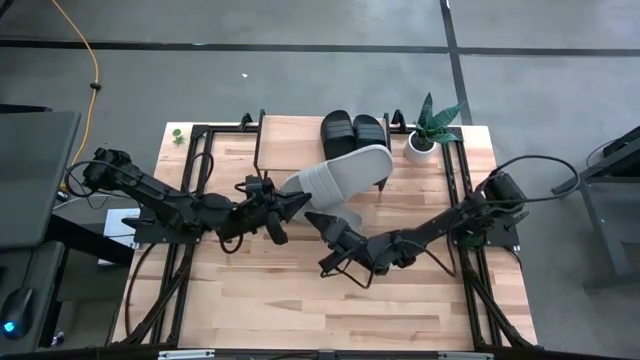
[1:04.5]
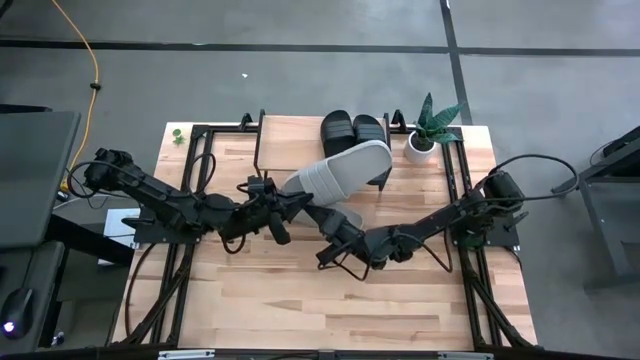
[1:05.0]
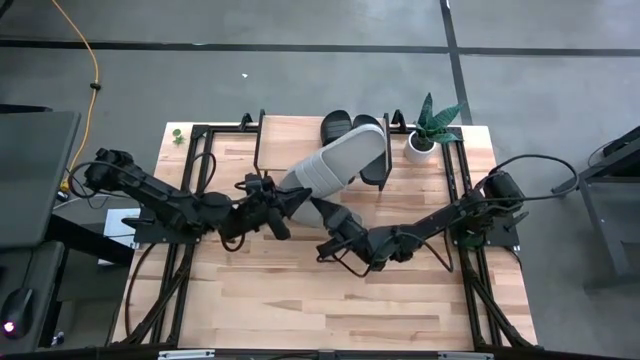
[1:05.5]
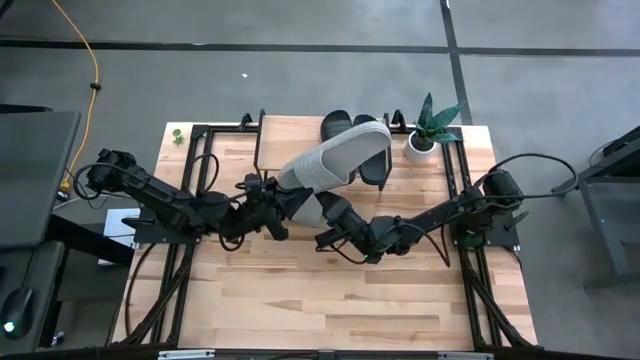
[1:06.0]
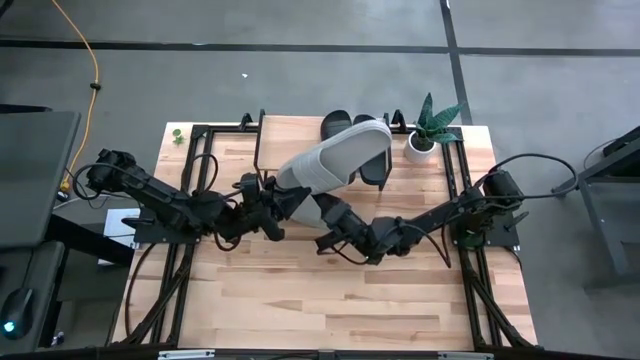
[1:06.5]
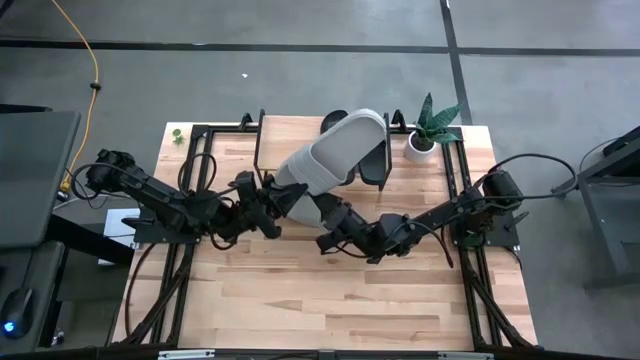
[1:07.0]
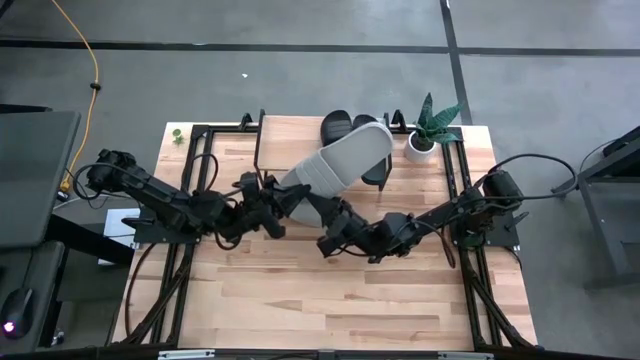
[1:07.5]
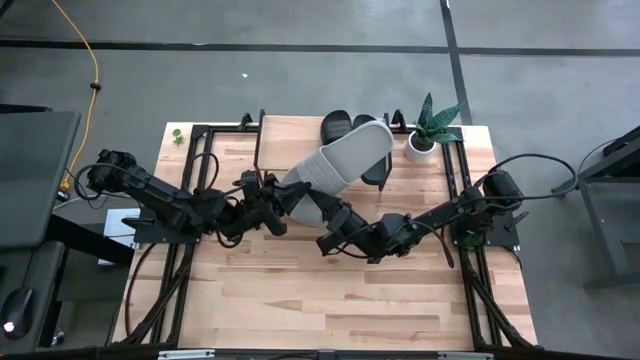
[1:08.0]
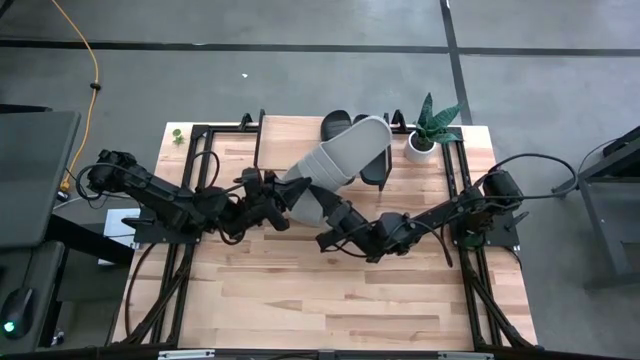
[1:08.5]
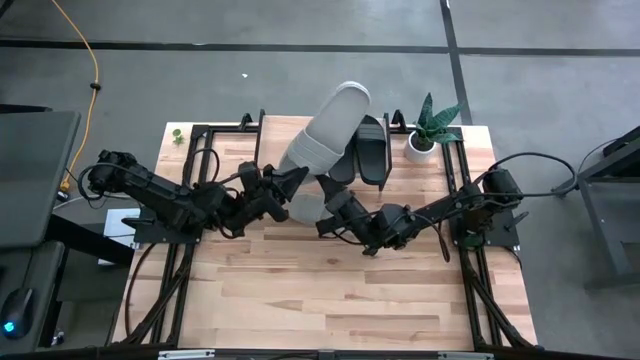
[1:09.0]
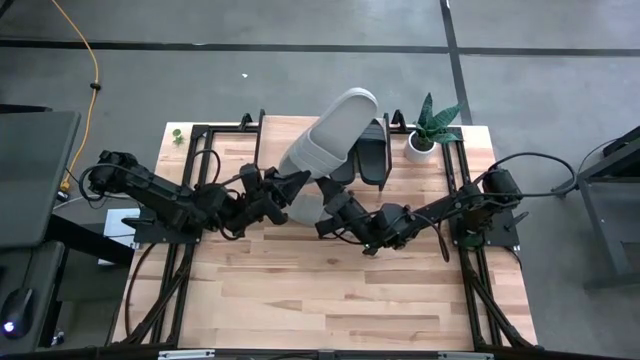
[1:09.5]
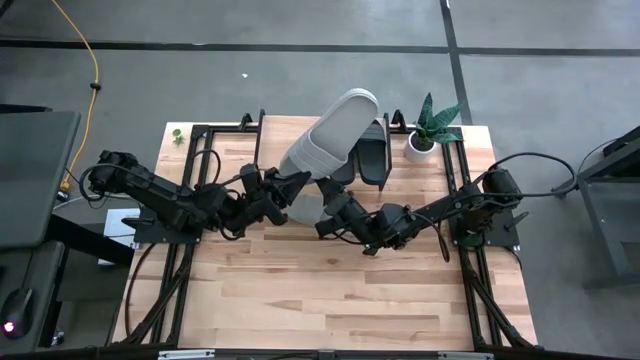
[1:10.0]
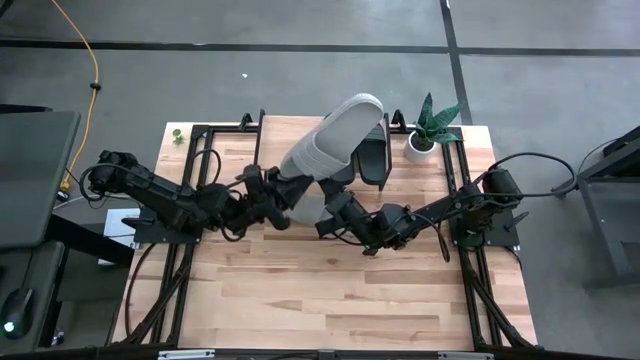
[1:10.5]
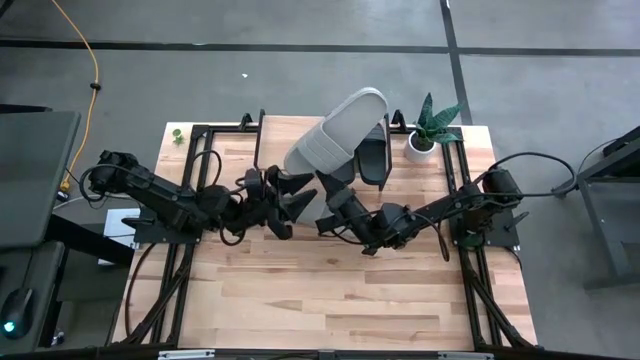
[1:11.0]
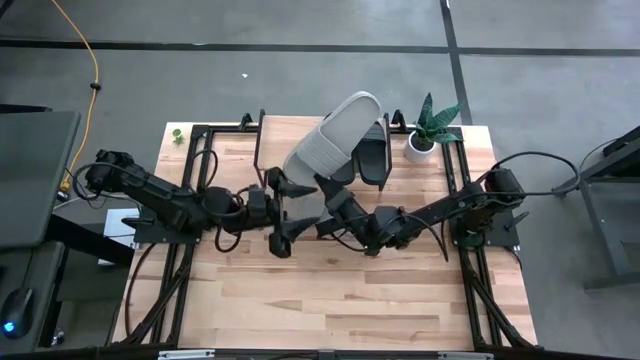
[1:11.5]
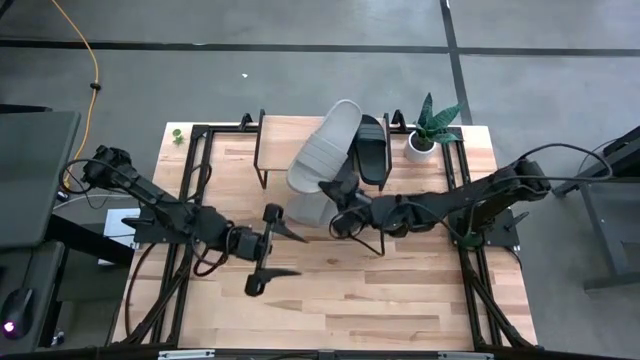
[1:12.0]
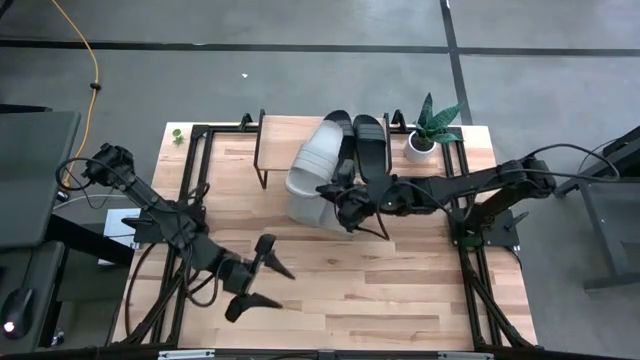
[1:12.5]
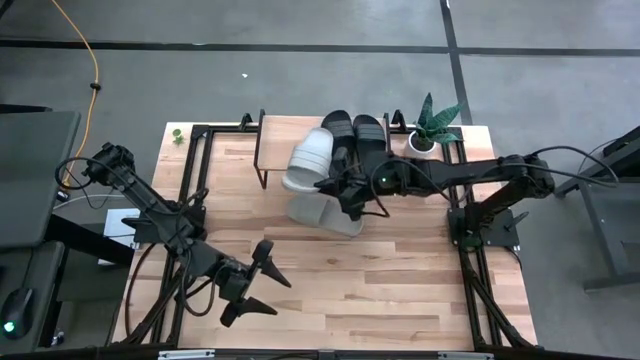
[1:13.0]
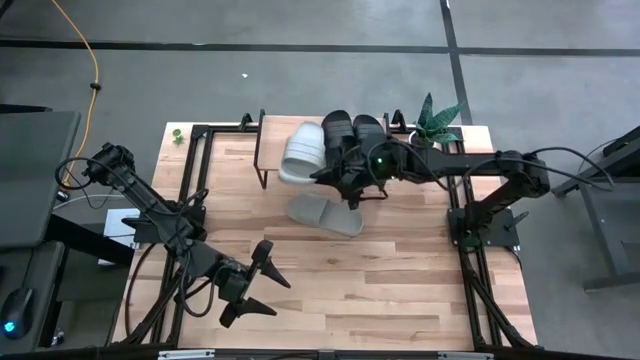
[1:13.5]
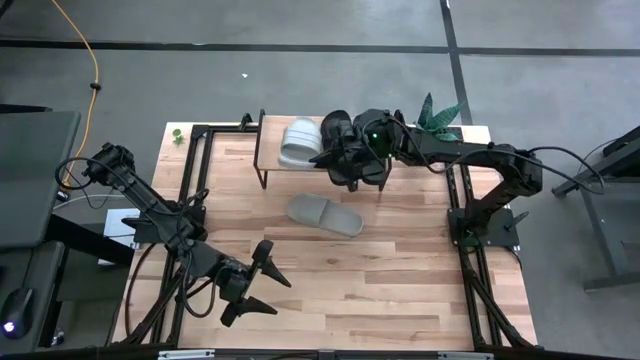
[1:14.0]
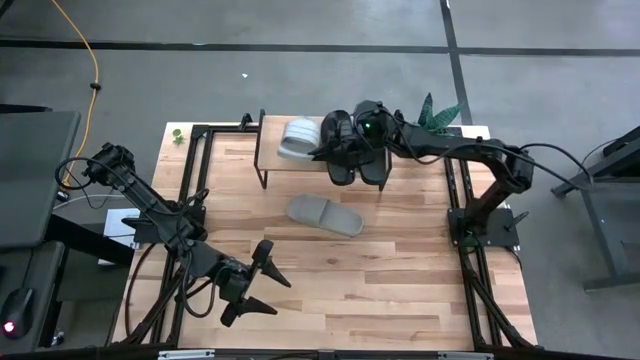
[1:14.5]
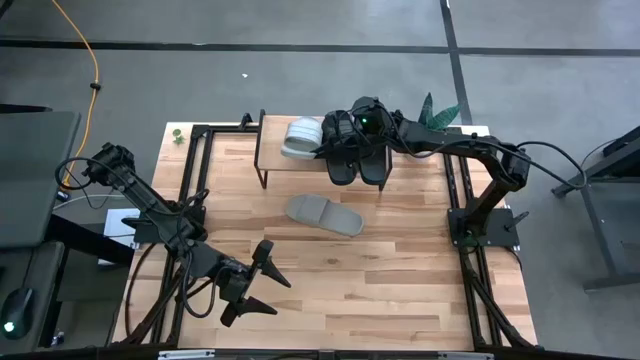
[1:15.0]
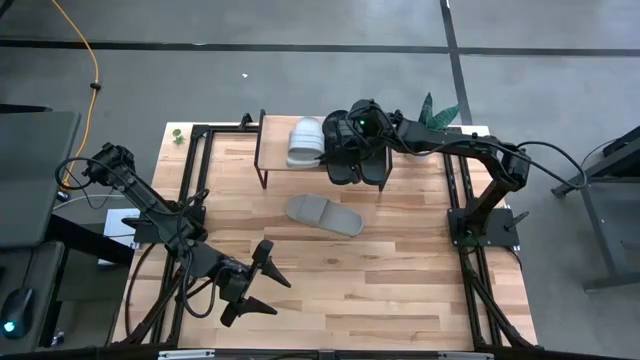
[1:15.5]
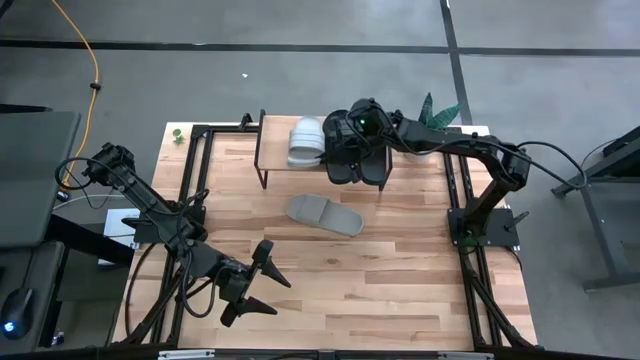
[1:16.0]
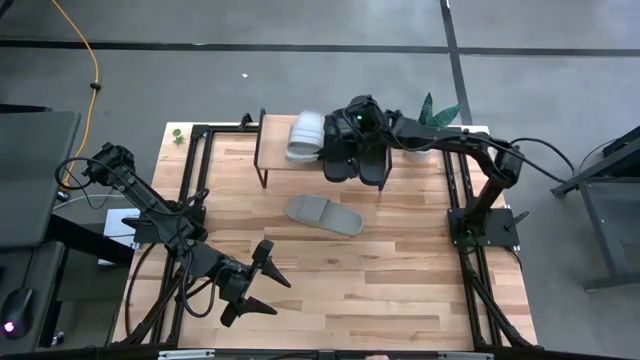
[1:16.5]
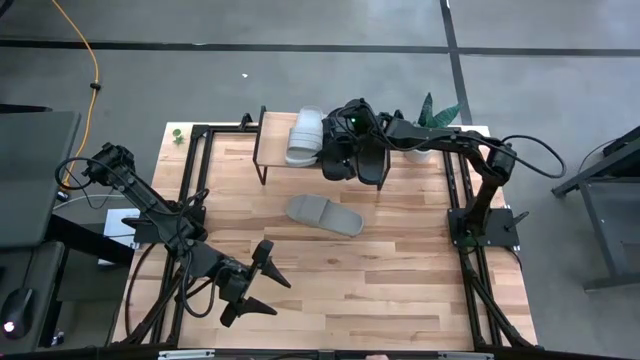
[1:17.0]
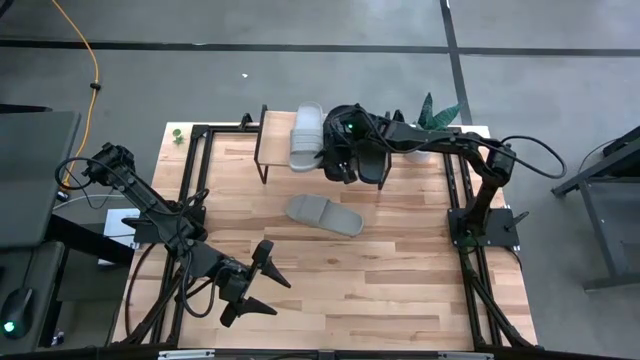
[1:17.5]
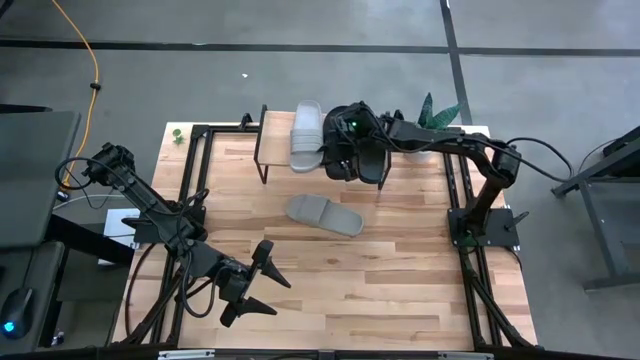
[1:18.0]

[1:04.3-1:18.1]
Task: Pick and place slides into the shelf
Put the bottom white slide on the shelf

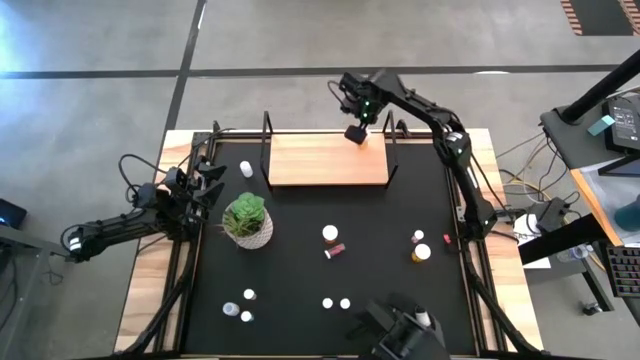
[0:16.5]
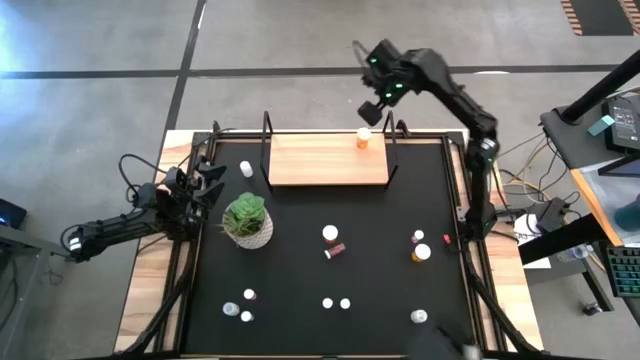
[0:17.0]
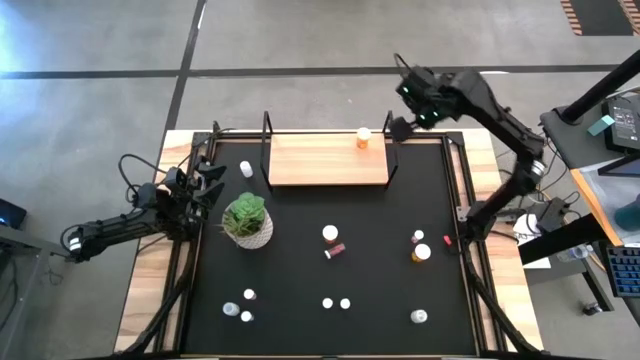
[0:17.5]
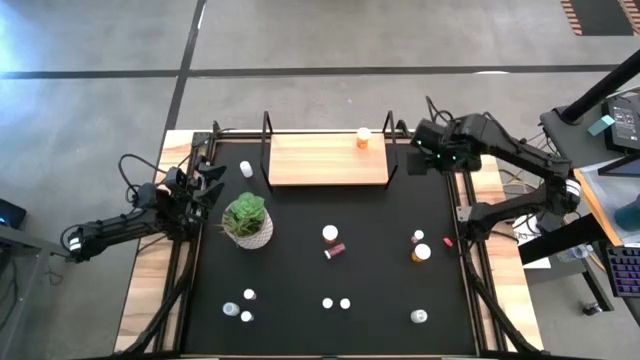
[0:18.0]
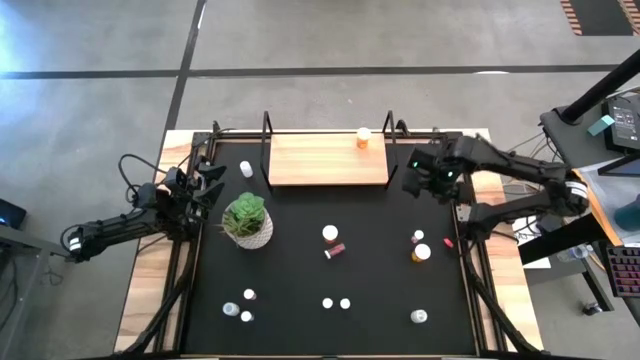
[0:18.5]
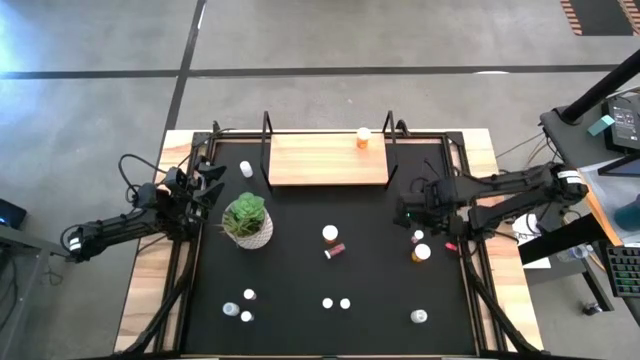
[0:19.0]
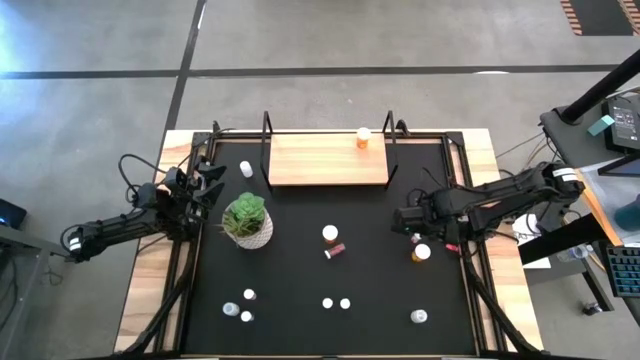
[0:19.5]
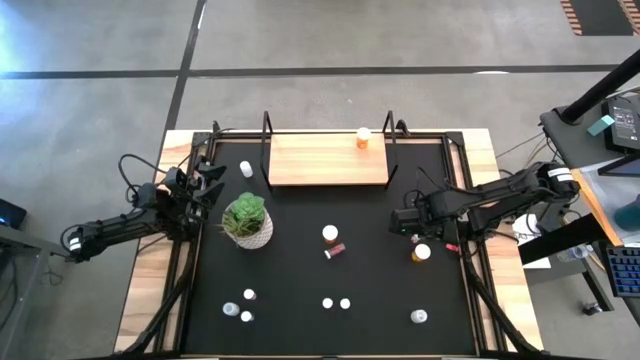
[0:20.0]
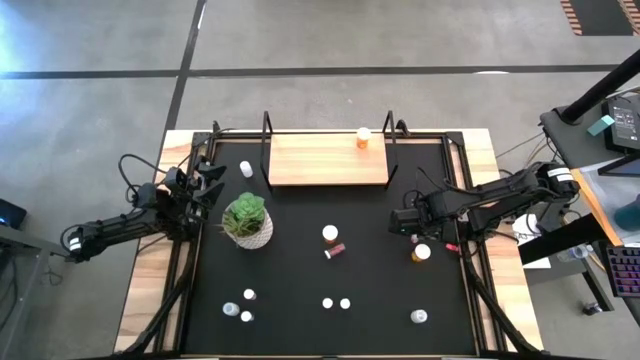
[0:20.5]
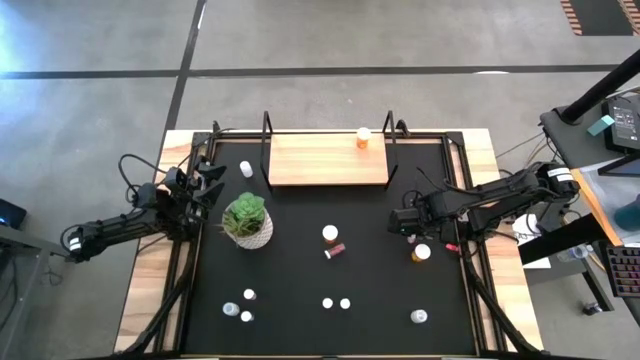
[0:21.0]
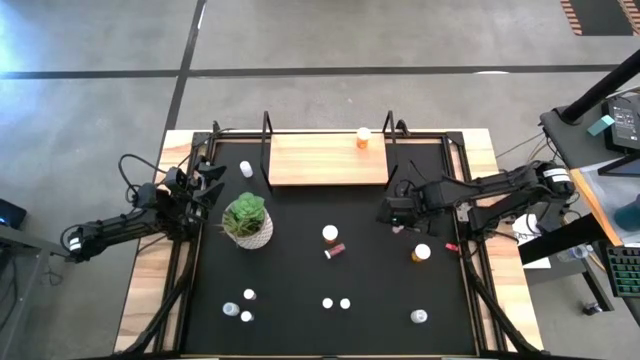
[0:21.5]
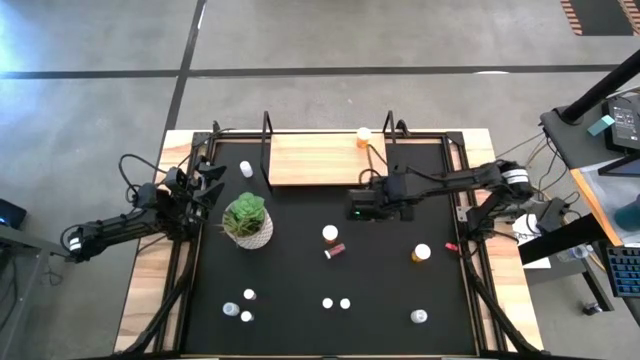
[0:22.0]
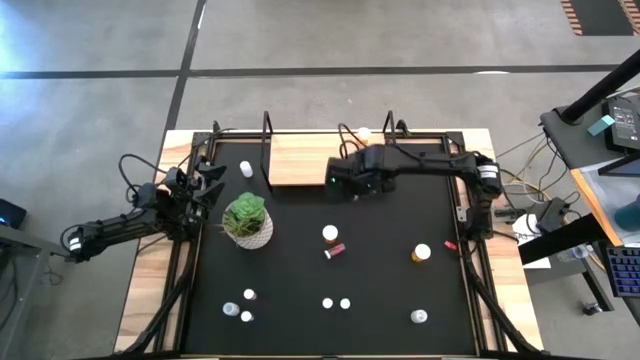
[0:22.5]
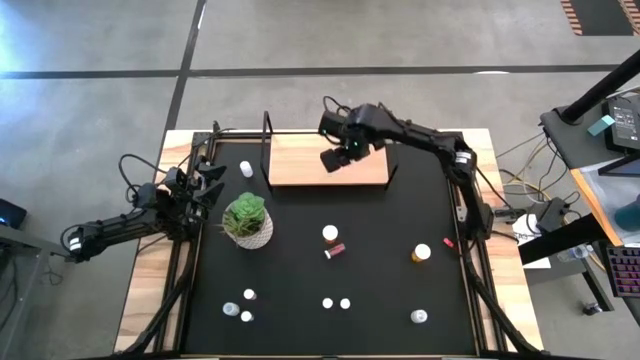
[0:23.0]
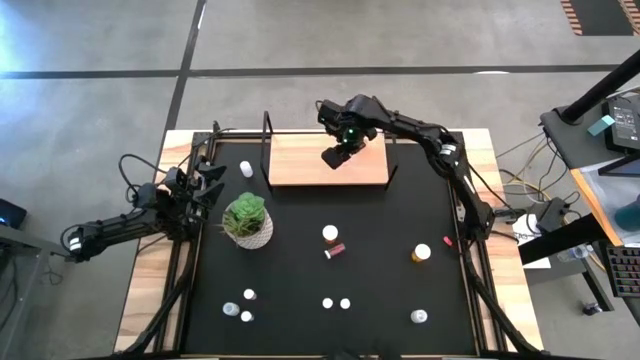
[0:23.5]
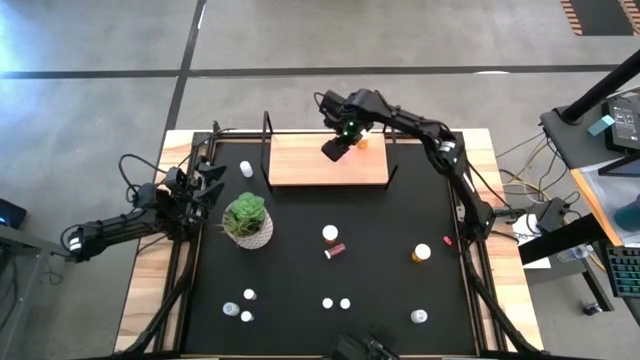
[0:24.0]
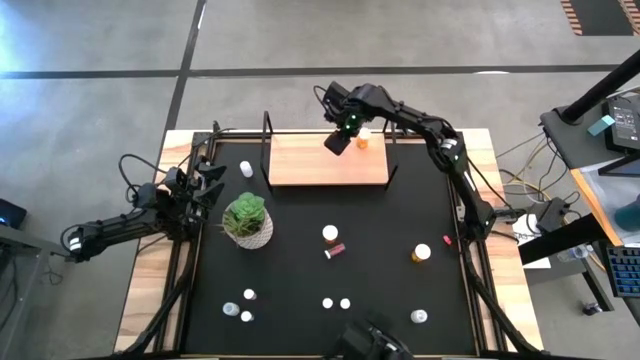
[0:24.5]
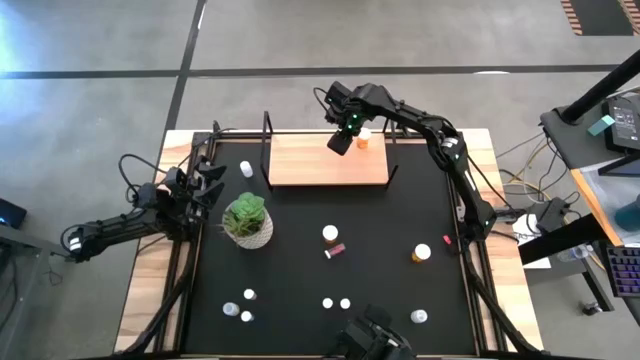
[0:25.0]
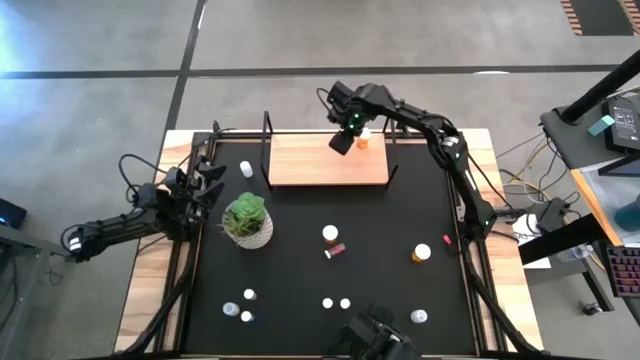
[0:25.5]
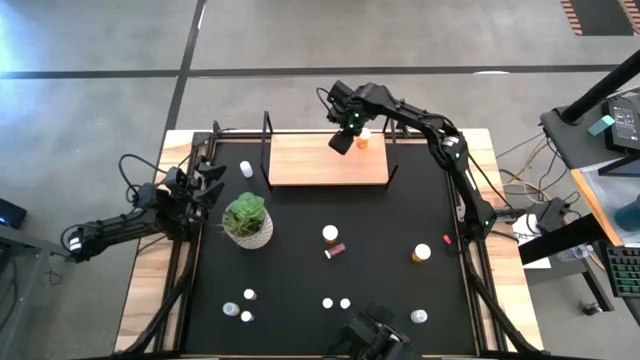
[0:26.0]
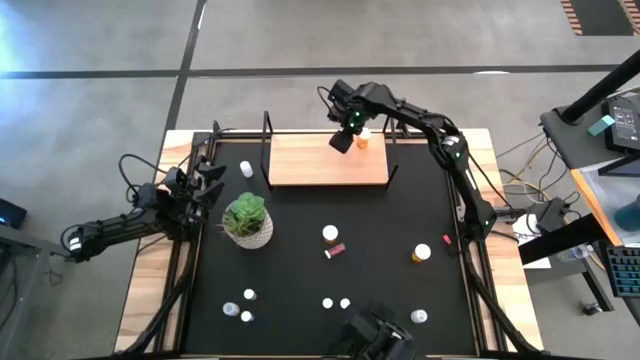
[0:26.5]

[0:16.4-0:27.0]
Task: Pick and place medicine bottles onto shelf by color
Put the top pink pill bottle on the shelf
